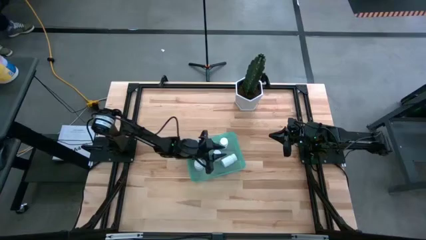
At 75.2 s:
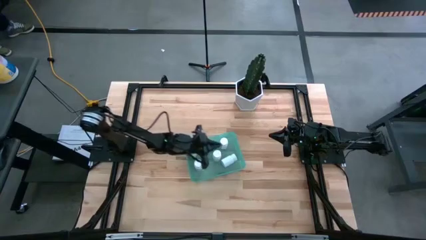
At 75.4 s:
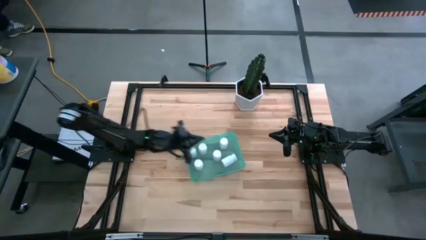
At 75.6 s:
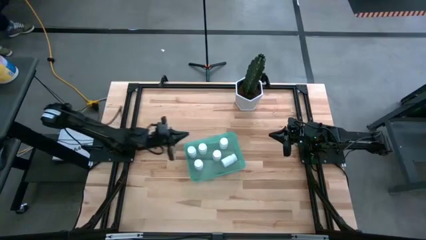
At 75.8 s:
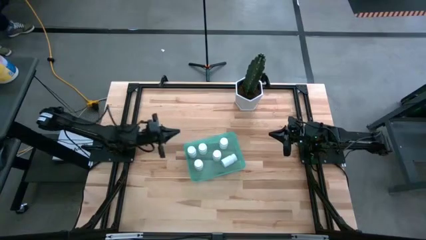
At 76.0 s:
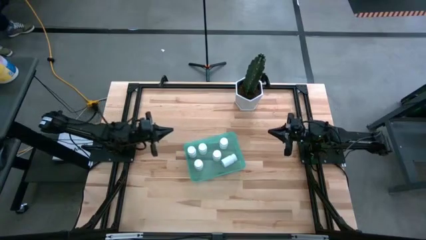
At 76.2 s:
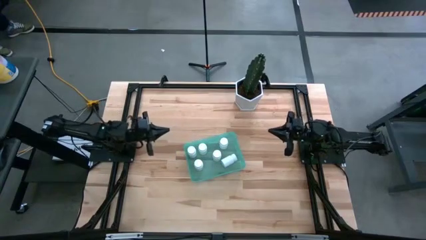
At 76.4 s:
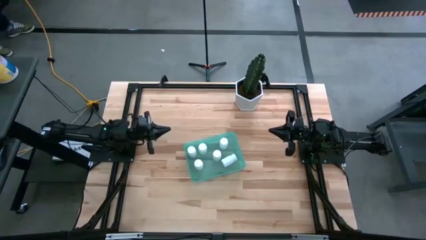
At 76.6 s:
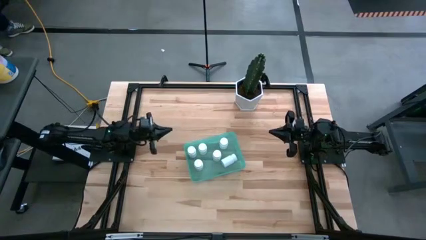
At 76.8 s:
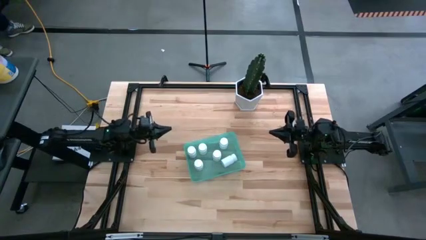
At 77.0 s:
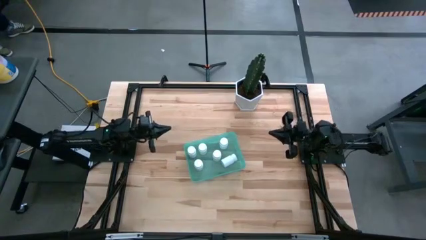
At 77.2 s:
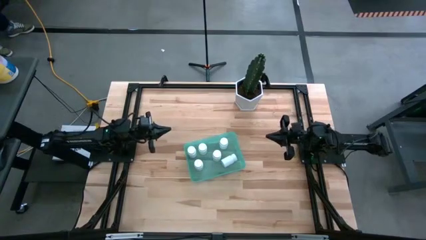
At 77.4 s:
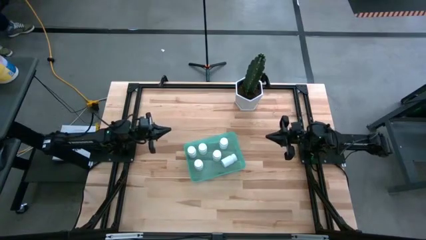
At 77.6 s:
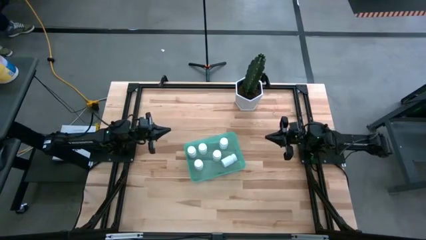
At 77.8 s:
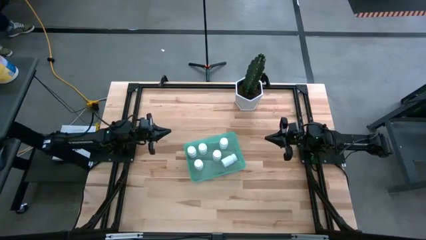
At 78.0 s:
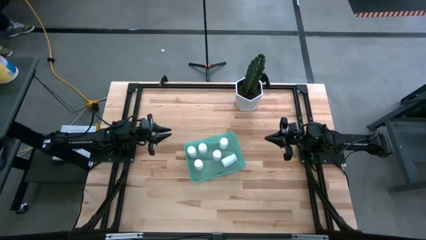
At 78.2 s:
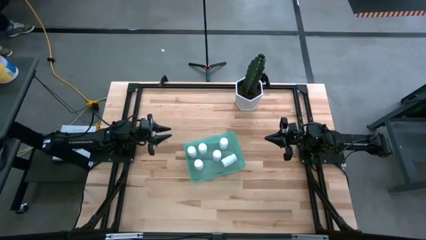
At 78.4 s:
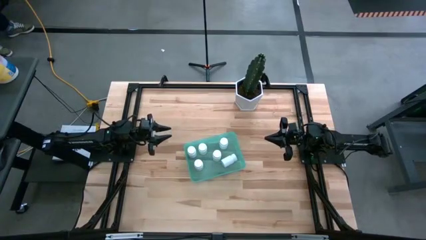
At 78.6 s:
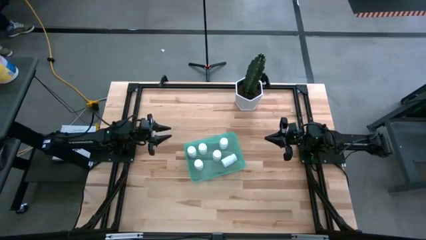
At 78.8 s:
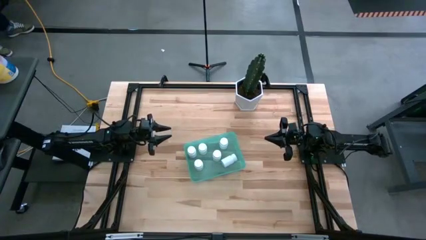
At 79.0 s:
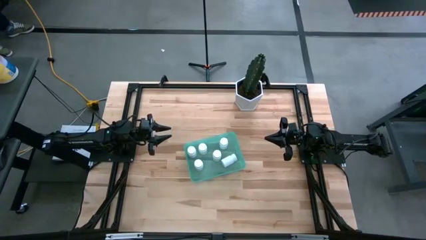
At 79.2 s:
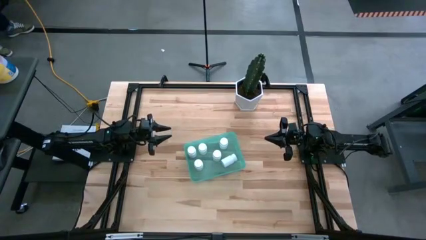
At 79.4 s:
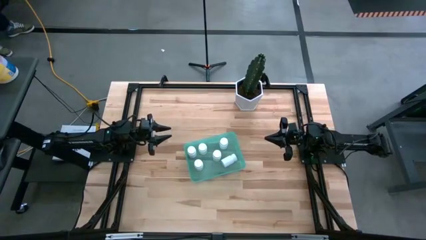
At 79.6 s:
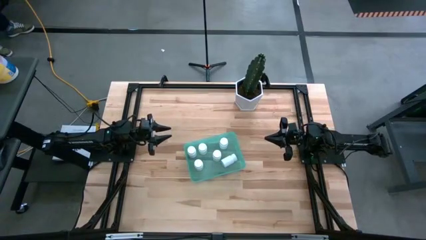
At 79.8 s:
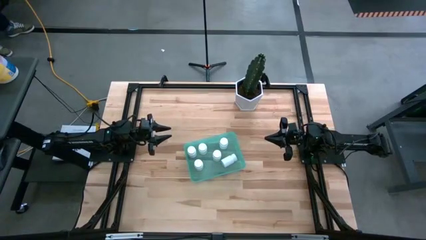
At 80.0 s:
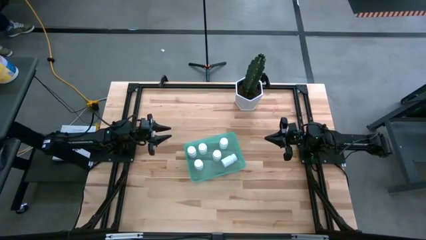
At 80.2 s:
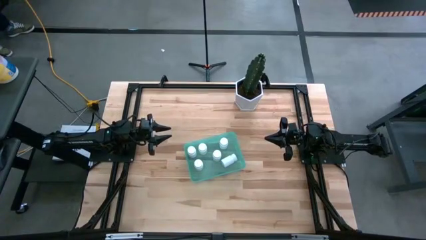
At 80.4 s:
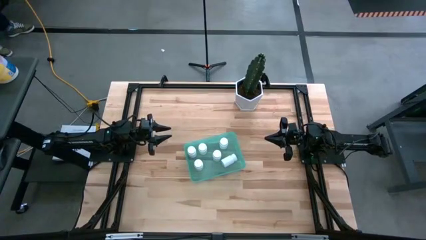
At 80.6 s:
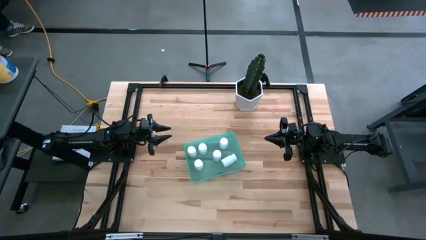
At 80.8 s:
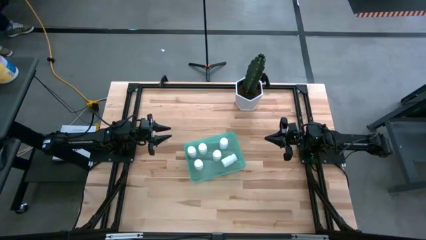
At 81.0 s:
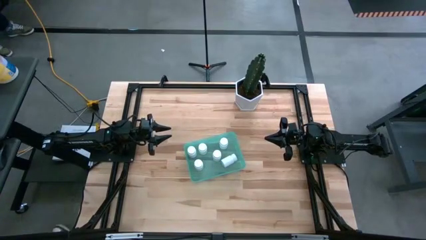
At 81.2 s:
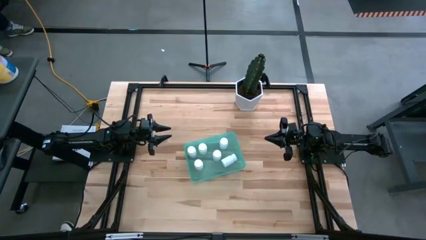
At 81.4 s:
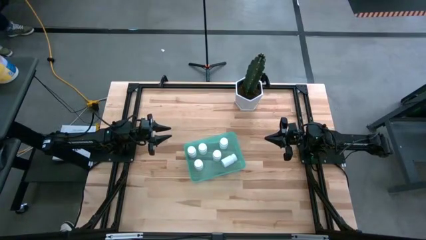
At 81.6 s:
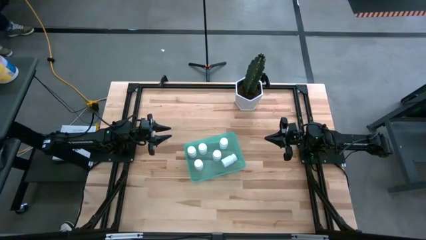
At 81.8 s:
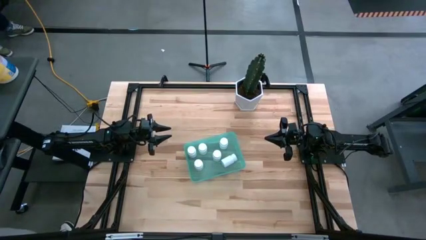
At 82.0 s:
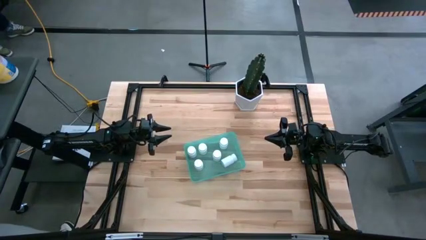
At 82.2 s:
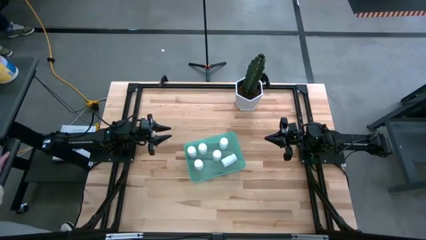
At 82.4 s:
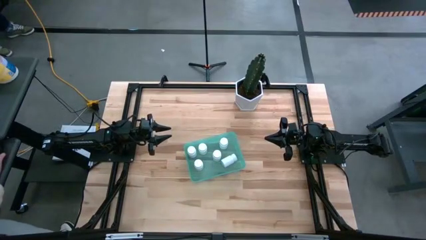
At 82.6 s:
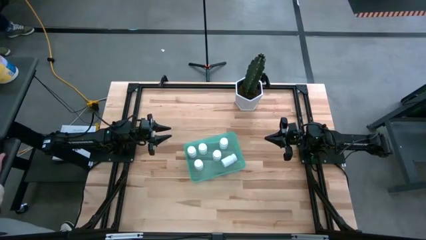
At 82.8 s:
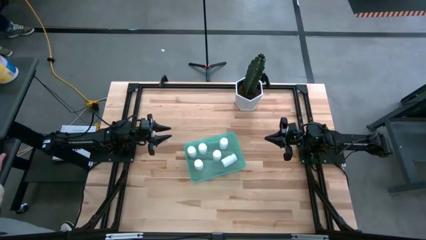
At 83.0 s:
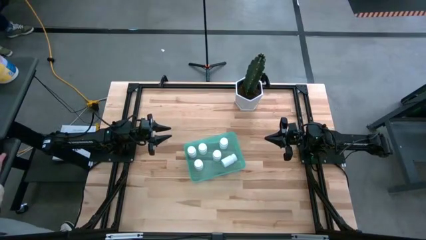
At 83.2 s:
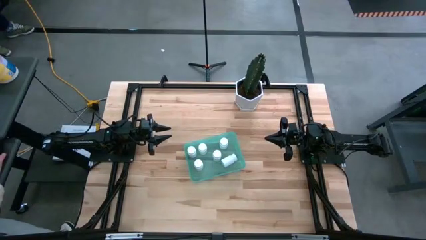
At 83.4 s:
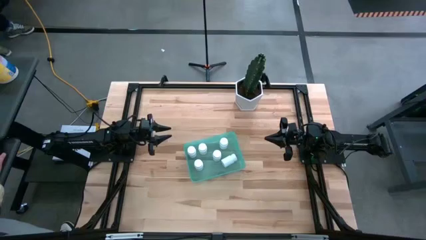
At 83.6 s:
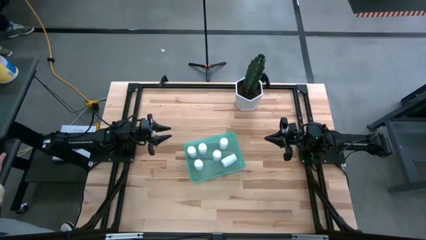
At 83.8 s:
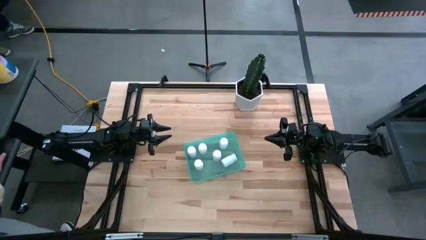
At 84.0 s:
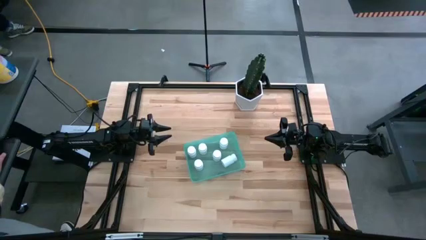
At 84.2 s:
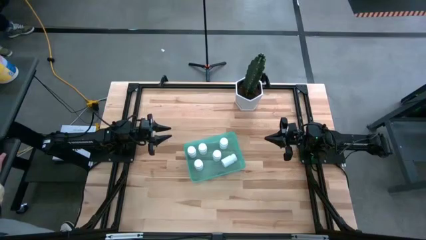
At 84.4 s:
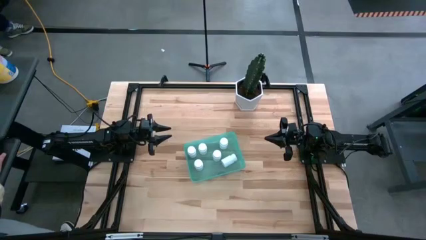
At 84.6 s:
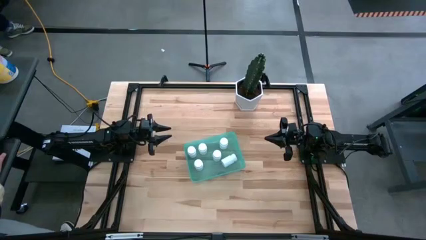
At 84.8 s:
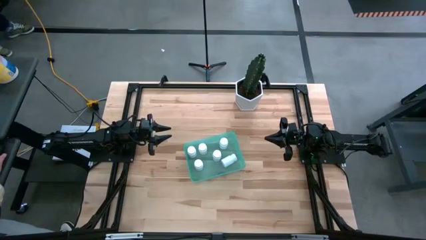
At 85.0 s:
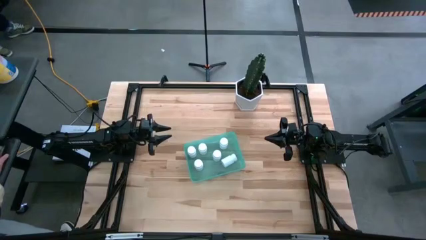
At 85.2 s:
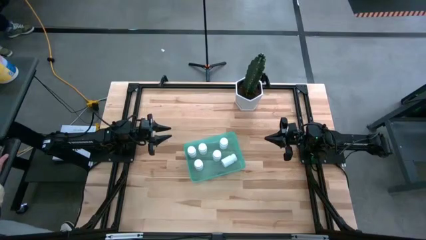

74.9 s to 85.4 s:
Task: Pick and place pill bottles into a basket
Return to Home Position

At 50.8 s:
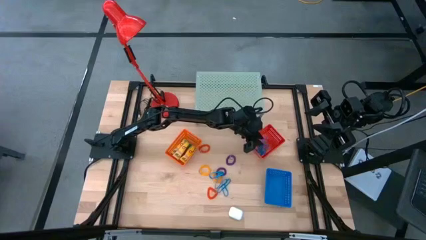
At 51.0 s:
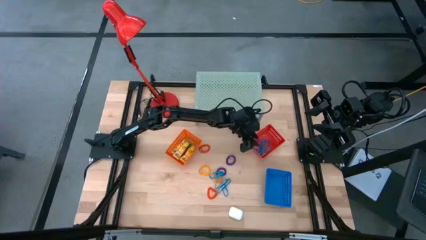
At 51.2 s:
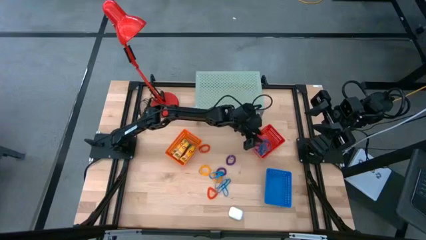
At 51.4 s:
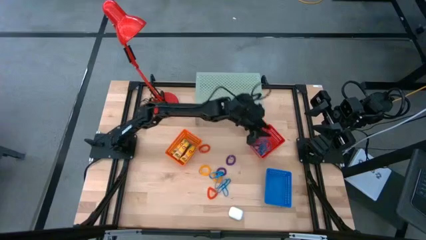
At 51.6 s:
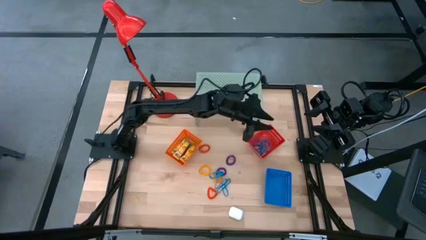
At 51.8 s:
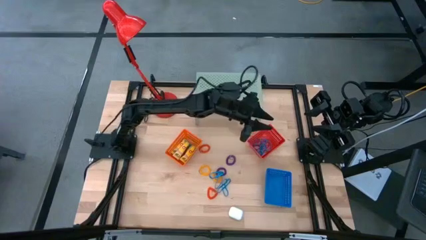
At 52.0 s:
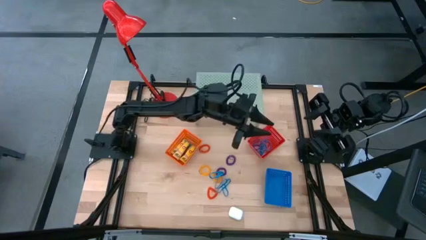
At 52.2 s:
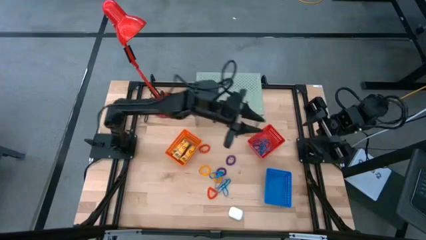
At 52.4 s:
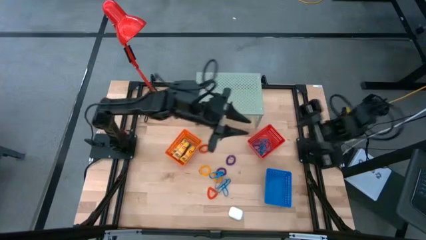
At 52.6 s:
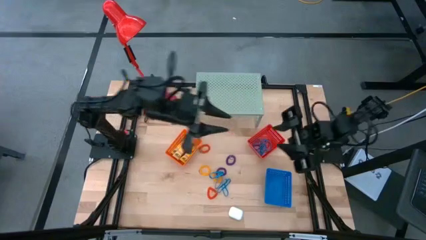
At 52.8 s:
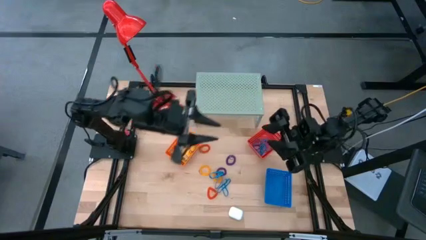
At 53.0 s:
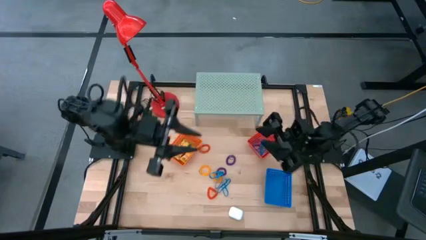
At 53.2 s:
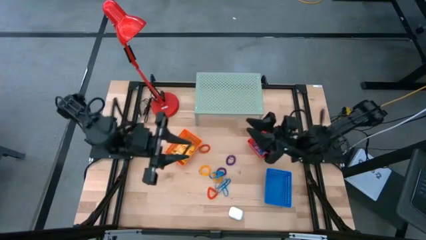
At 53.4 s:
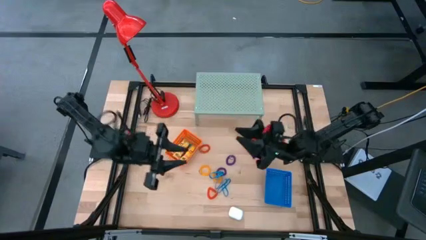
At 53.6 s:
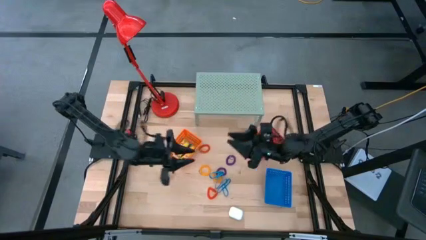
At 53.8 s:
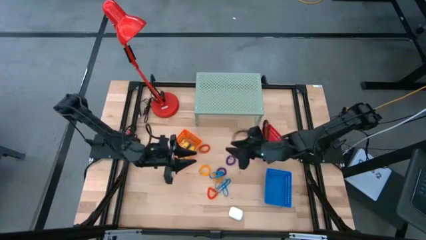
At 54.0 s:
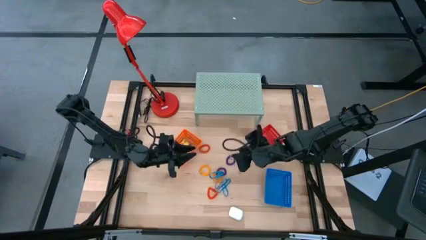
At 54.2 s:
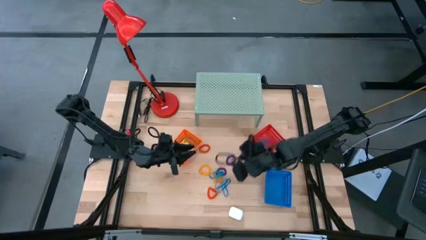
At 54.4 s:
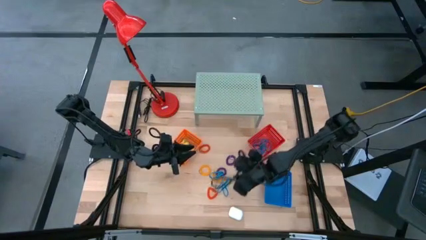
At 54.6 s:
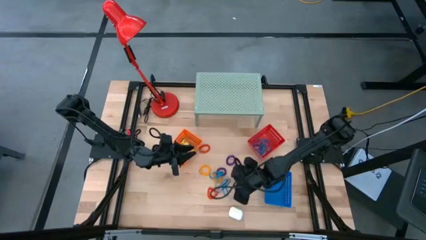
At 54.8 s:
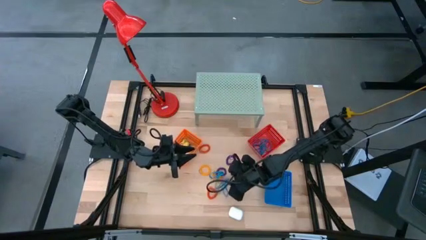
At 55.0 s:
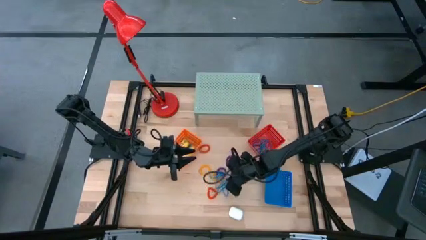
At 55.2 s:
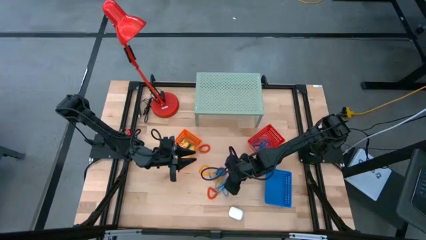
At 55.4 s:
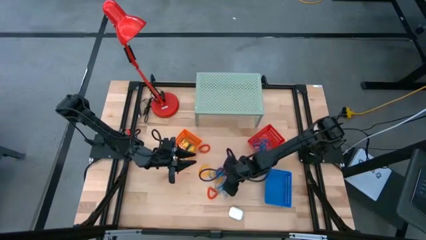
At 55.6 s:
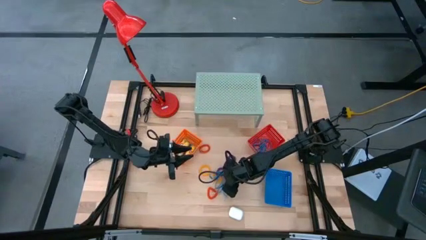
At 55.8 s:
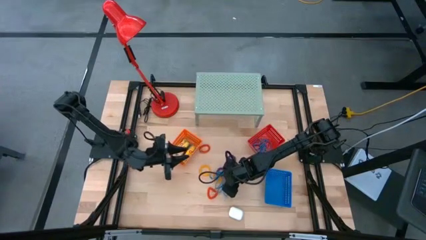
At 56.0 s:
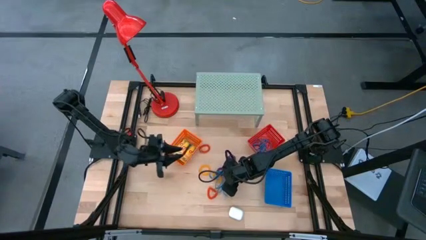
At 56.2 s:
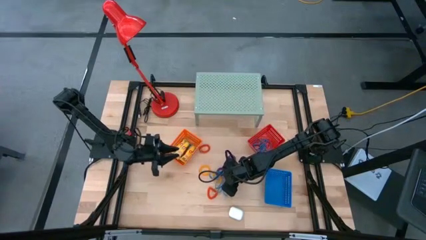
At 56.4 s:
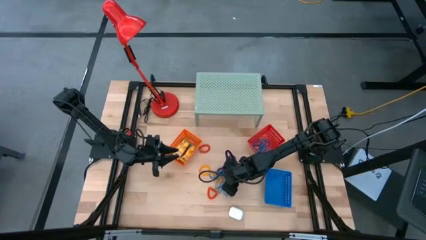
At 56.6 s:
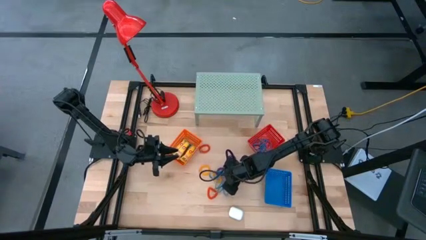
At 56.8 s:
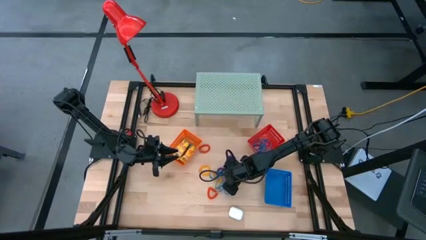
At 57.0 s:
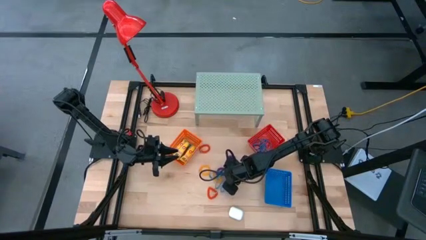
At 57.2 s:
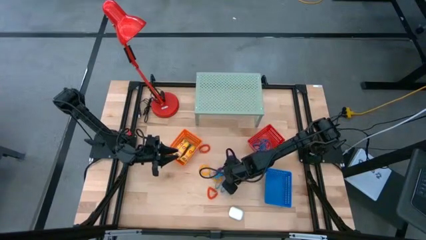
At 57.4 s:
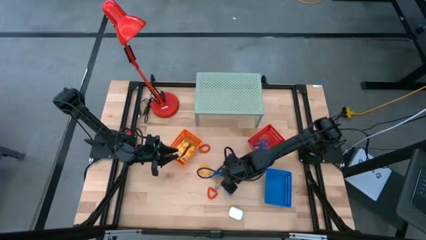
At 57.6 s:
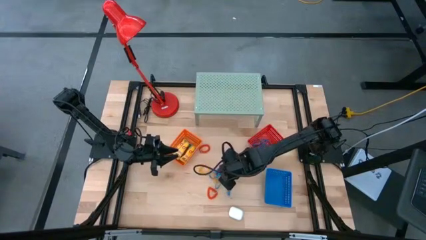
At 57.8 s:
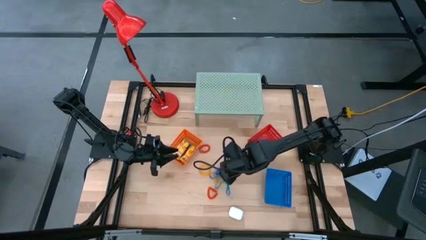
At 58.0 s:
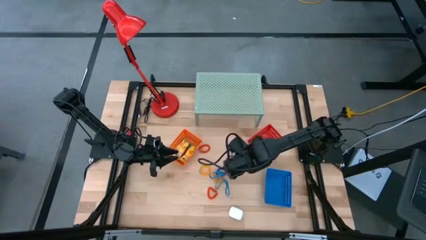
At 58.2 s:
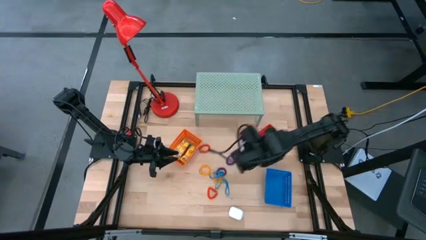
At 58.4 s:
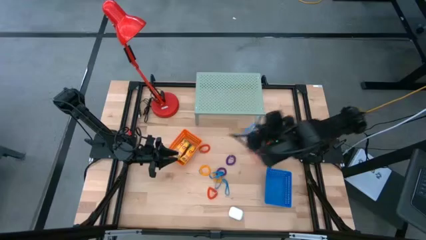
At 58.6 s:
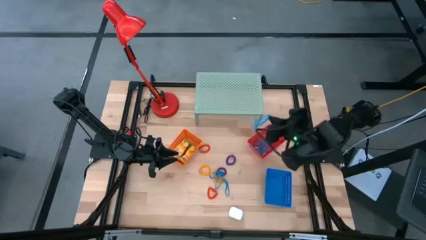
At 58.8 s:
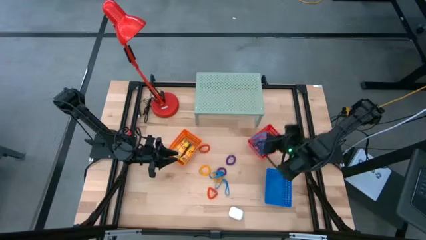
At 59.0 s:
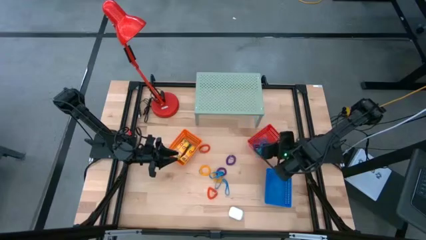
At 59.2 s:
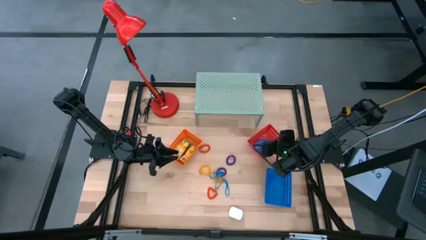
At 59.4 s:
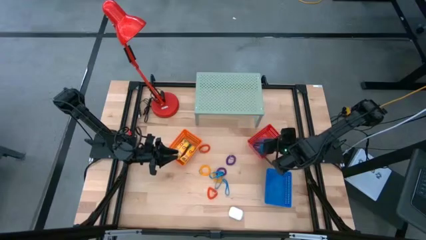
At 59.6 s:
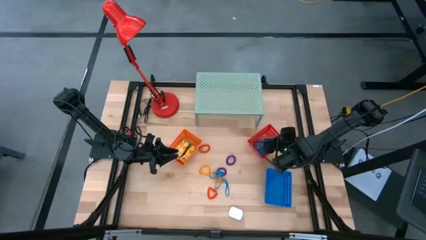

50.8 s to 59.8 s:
Task: Pick & Place Office Desk Supplies
Put the blue rubber band into the red bin
